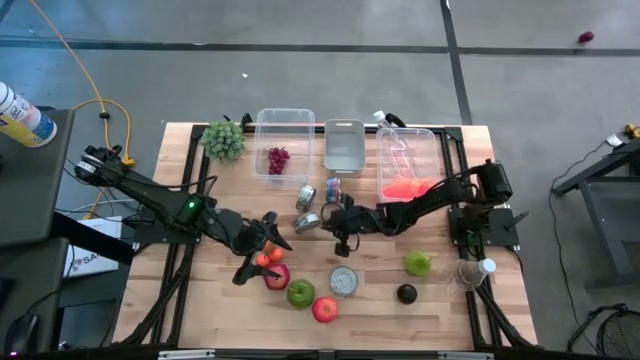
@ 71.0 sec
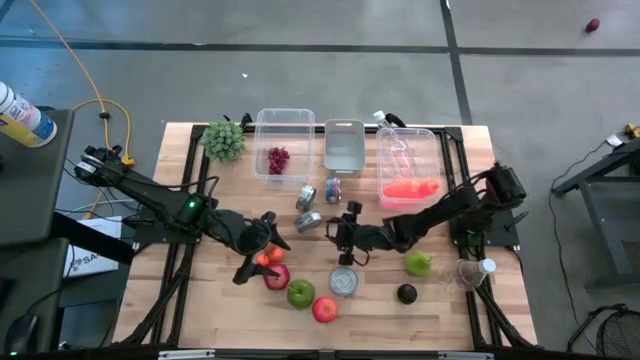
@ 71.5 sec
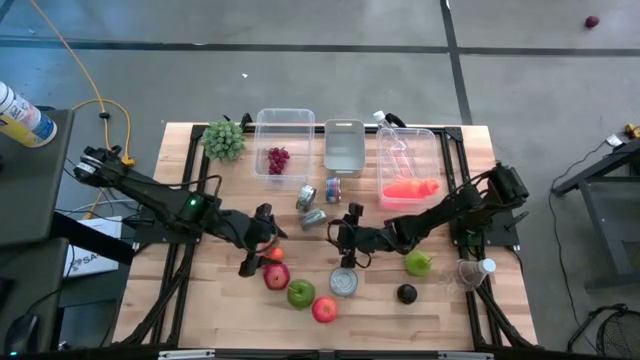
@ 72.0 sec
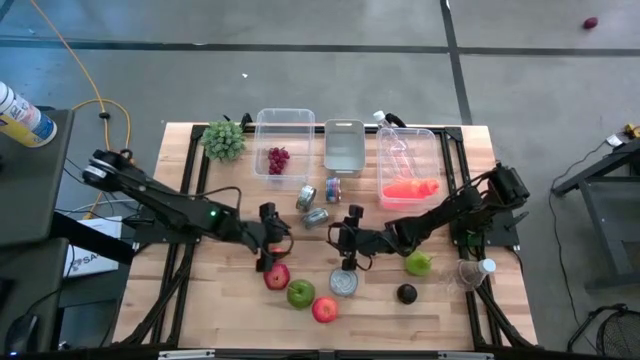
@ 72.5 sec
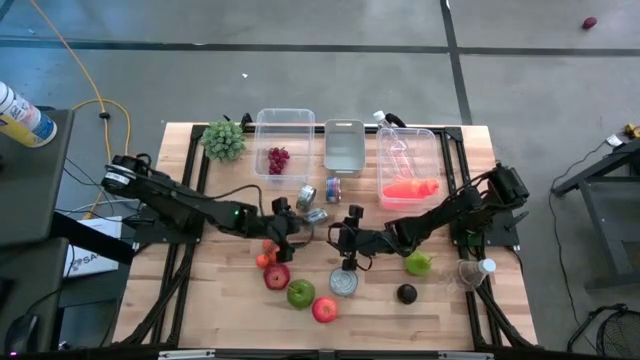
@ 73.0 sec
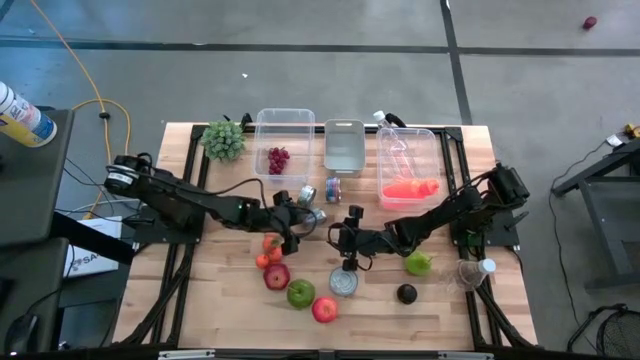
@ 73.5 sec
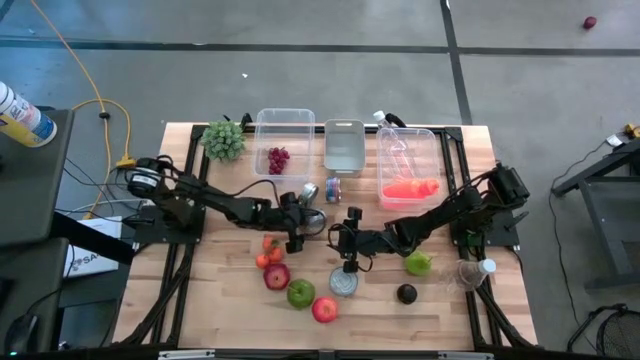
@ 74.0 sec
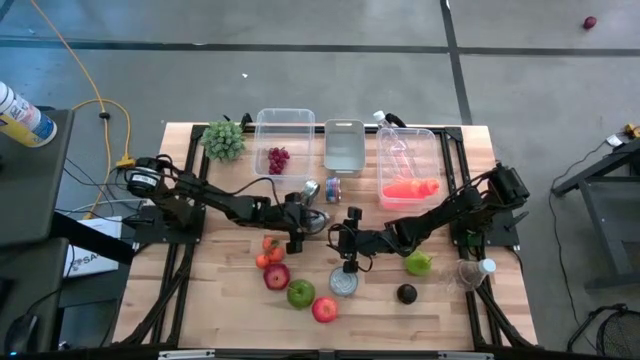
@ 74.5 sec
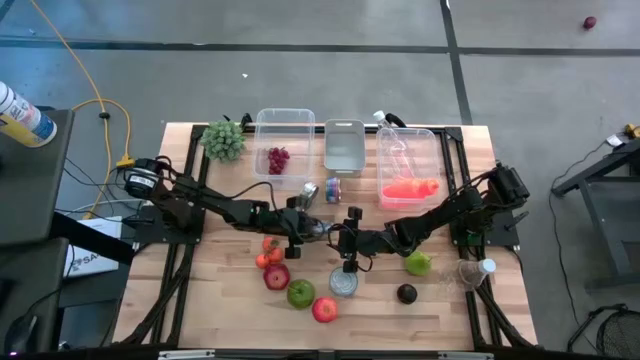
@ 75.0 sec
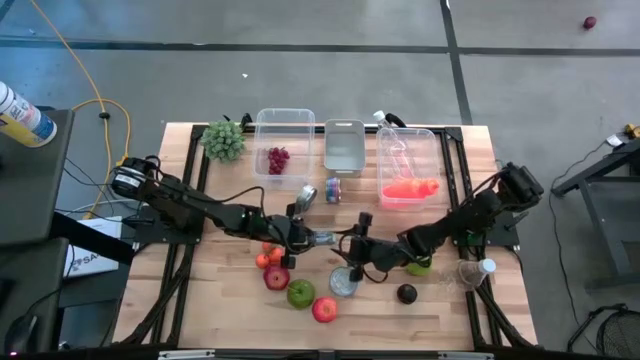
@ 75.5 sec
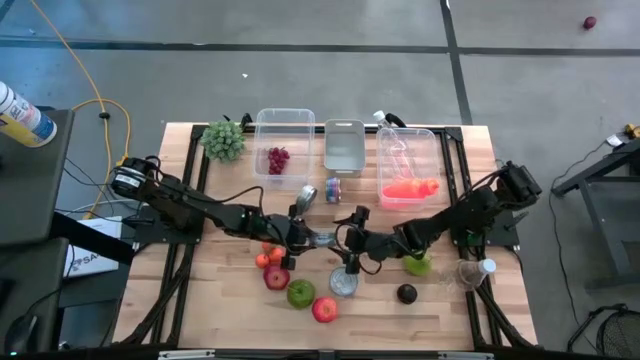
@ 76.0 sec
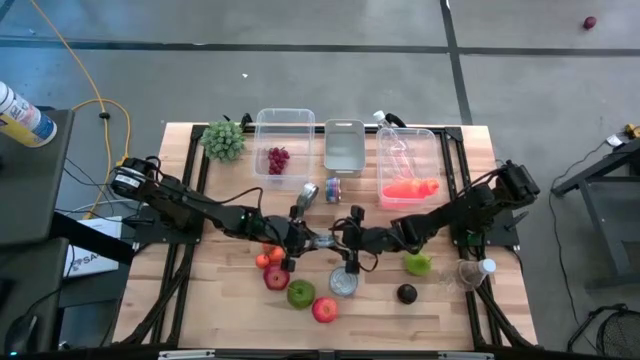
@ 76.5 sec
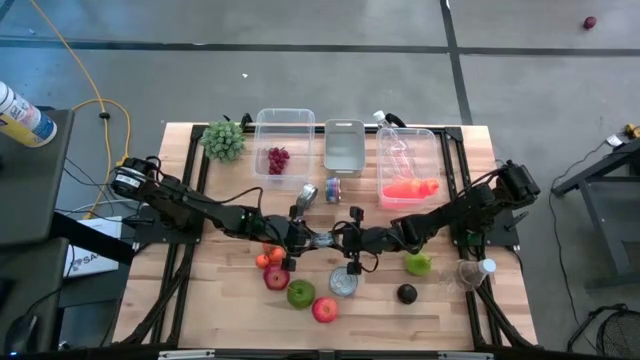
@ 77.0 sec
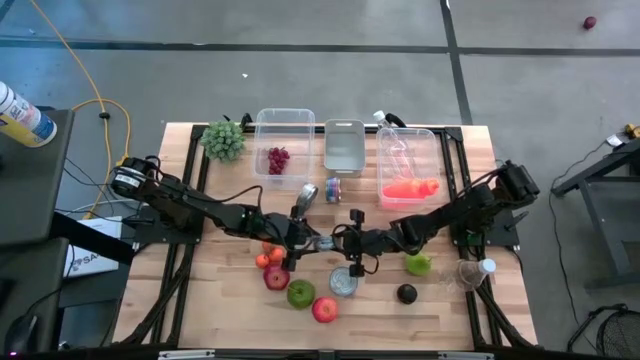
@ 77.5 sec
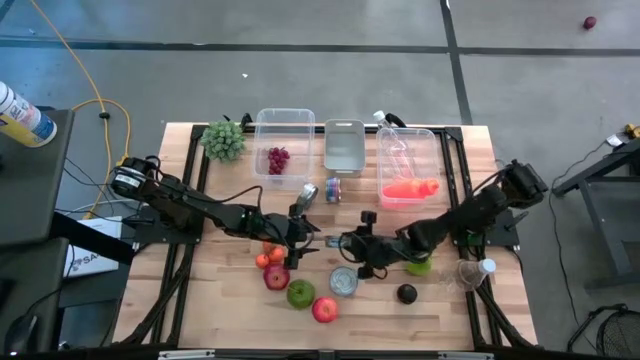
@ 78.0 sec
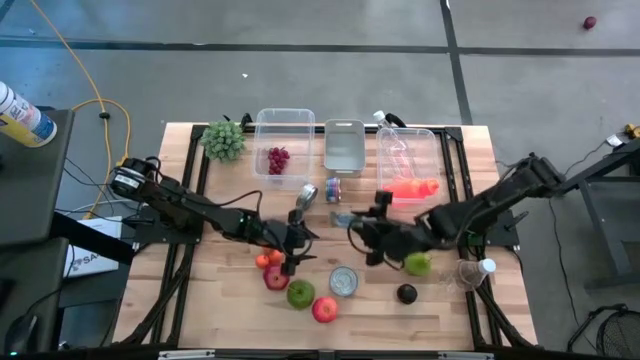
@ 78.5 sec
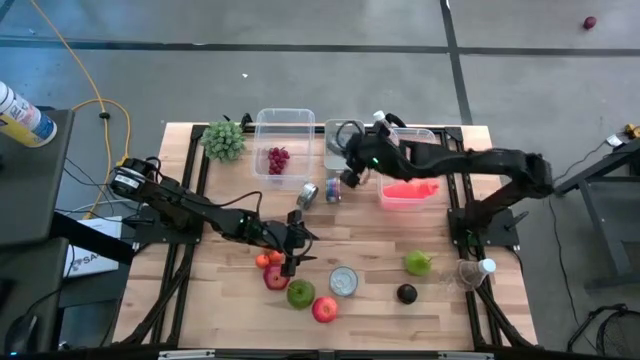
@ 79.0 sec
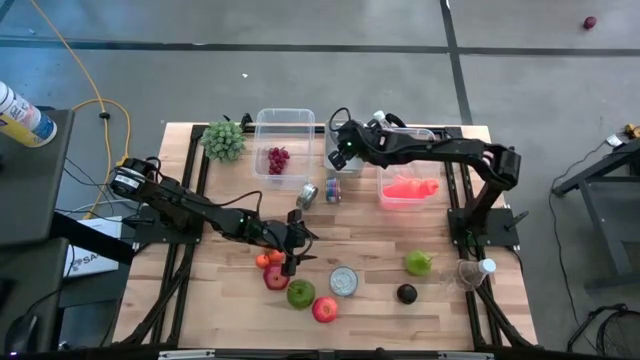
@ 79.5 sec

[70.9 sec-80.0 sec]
Task: Pick & Place Food Item
Put the bottom green tuna can into the white bin
